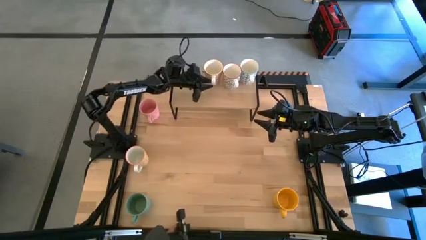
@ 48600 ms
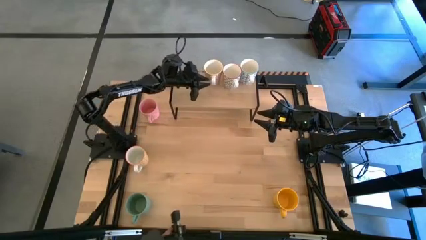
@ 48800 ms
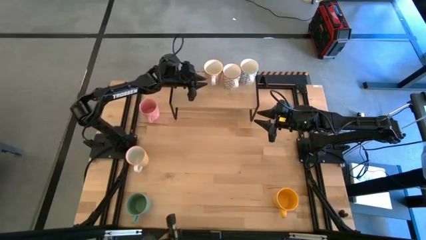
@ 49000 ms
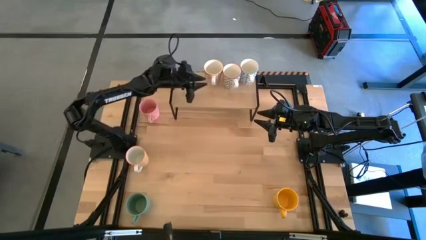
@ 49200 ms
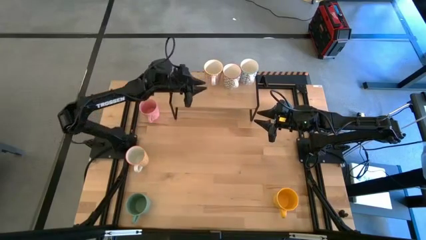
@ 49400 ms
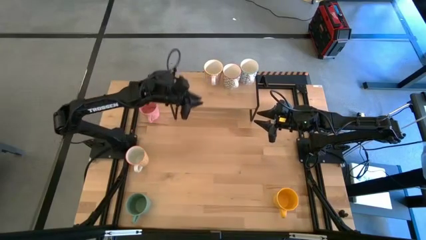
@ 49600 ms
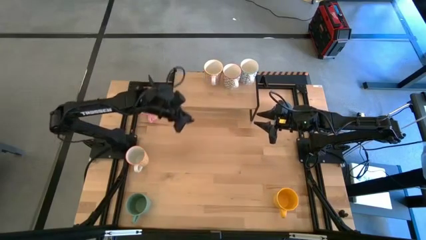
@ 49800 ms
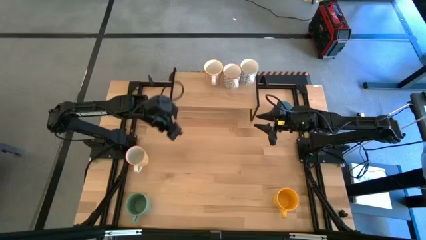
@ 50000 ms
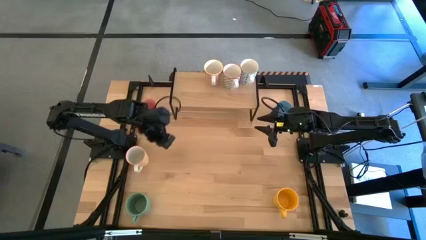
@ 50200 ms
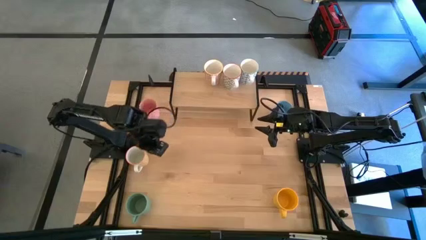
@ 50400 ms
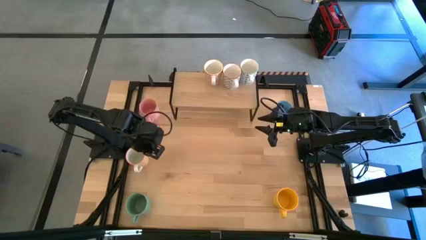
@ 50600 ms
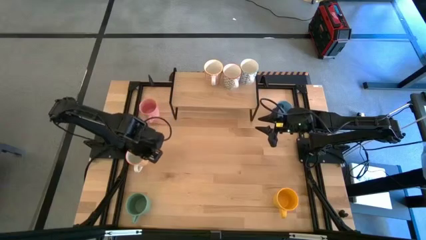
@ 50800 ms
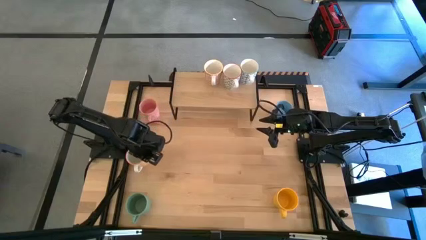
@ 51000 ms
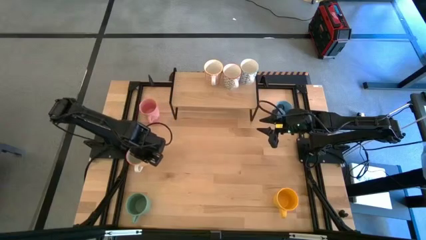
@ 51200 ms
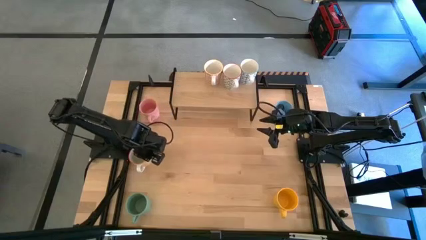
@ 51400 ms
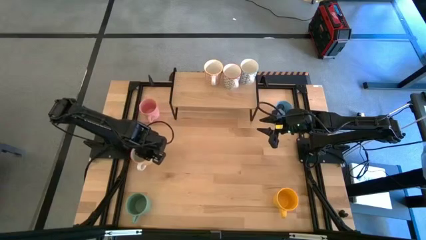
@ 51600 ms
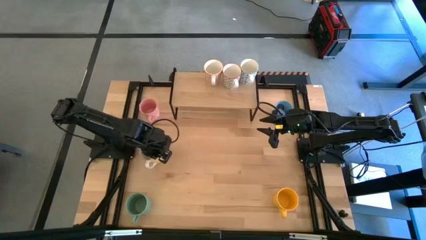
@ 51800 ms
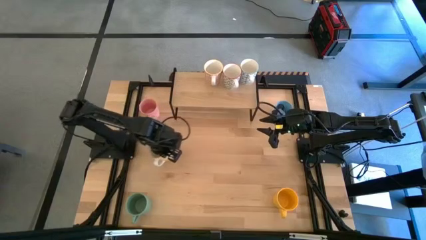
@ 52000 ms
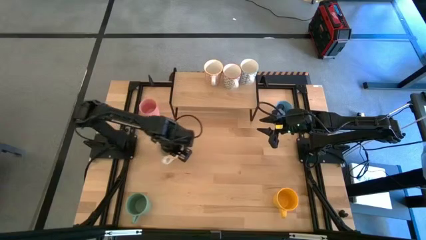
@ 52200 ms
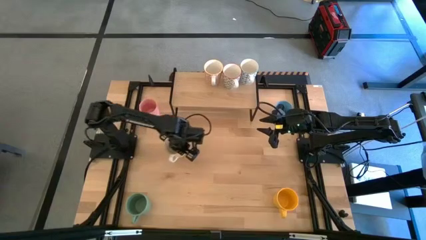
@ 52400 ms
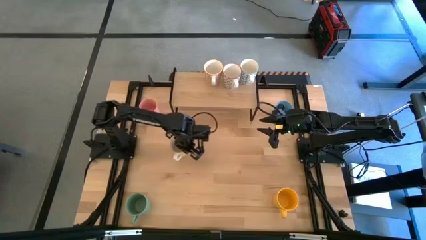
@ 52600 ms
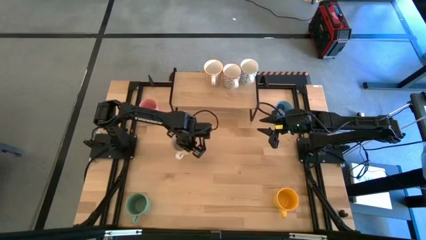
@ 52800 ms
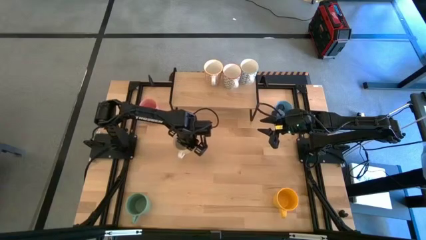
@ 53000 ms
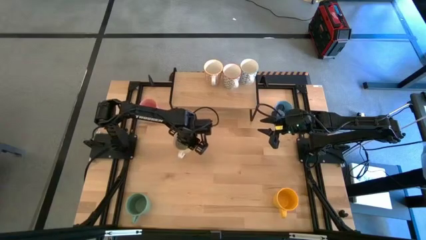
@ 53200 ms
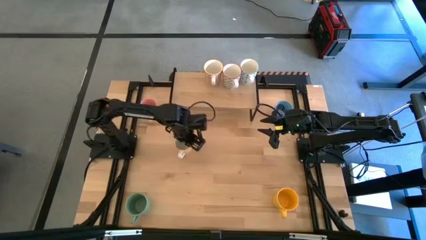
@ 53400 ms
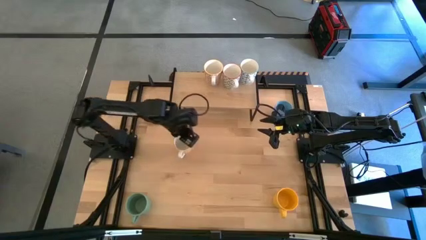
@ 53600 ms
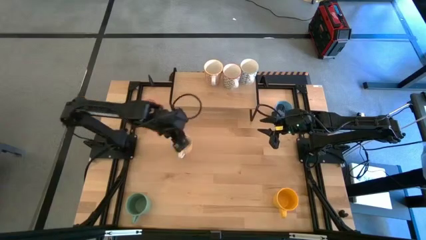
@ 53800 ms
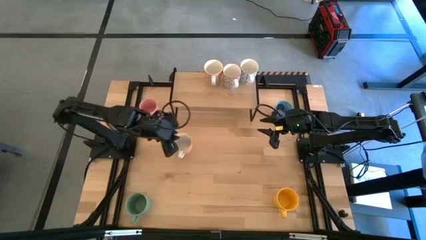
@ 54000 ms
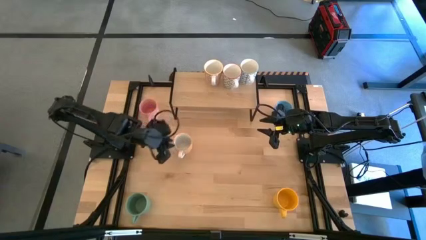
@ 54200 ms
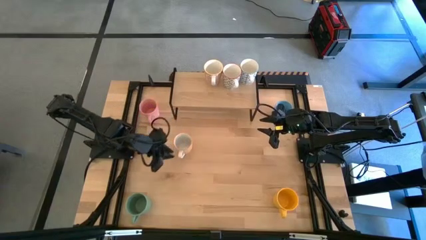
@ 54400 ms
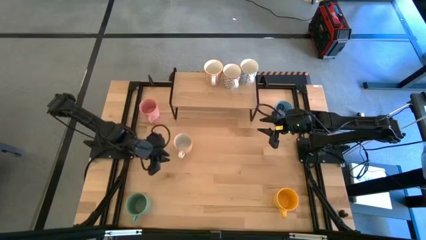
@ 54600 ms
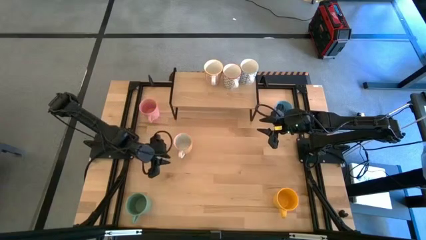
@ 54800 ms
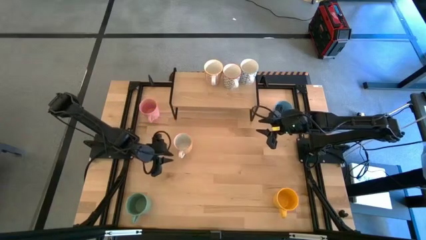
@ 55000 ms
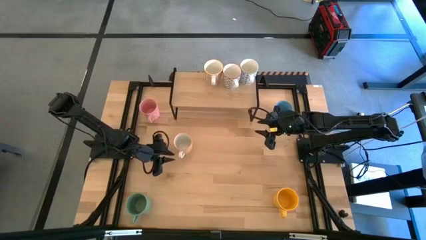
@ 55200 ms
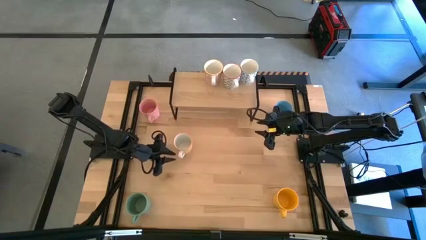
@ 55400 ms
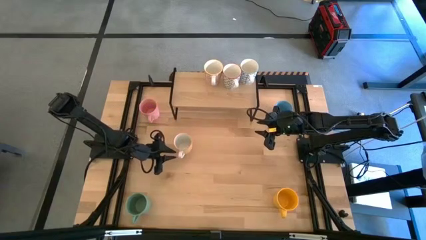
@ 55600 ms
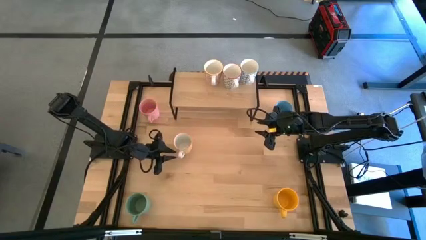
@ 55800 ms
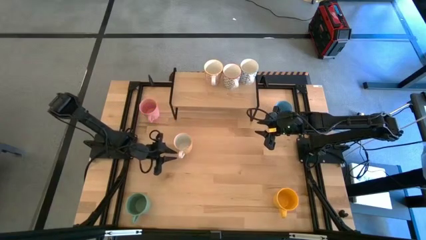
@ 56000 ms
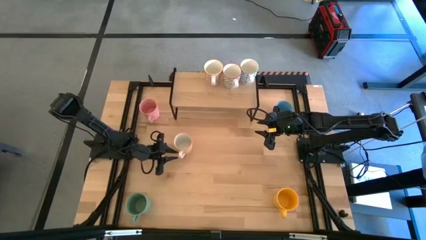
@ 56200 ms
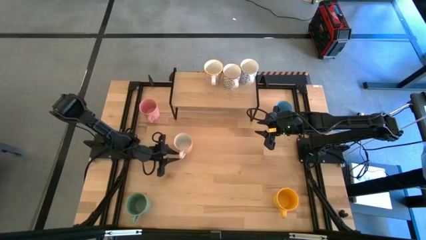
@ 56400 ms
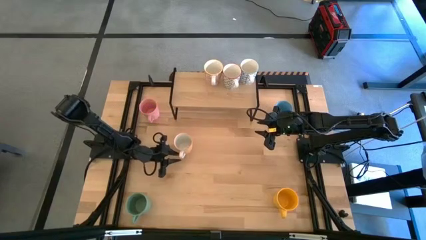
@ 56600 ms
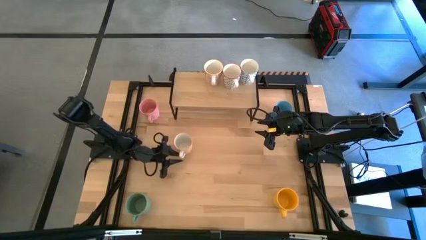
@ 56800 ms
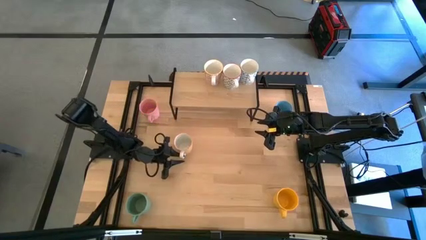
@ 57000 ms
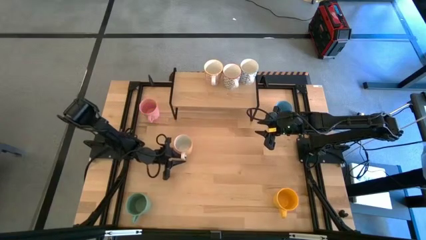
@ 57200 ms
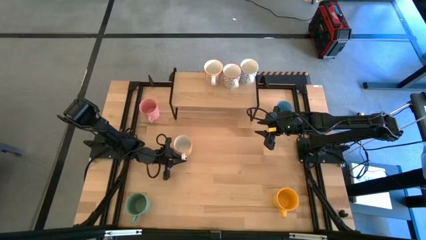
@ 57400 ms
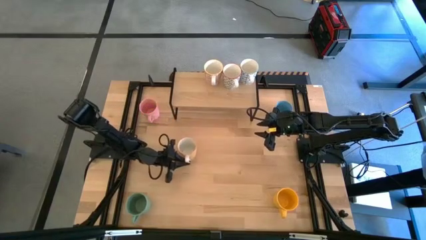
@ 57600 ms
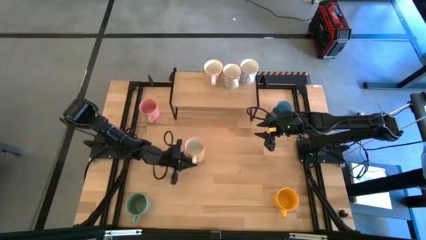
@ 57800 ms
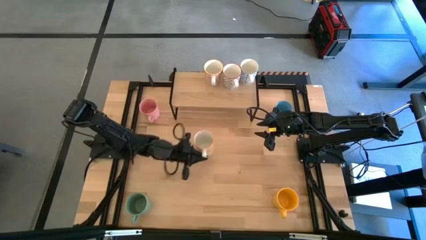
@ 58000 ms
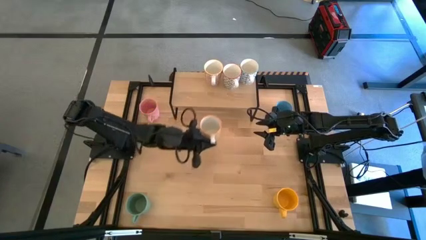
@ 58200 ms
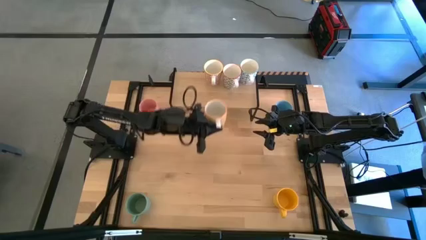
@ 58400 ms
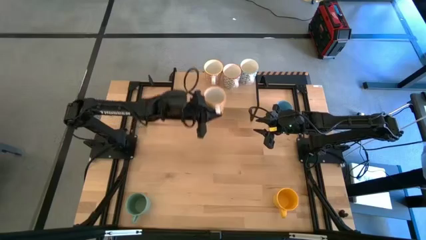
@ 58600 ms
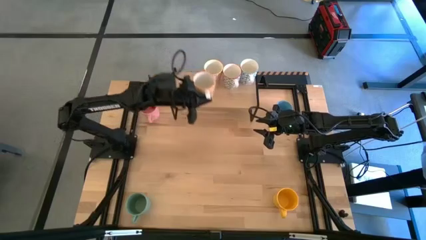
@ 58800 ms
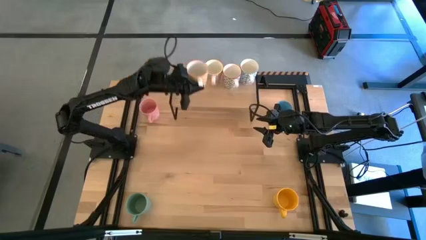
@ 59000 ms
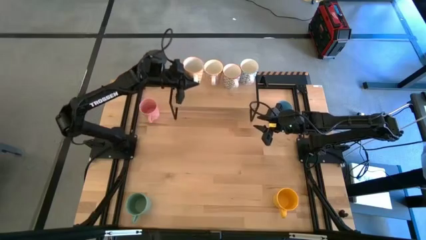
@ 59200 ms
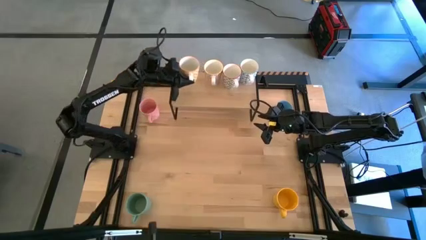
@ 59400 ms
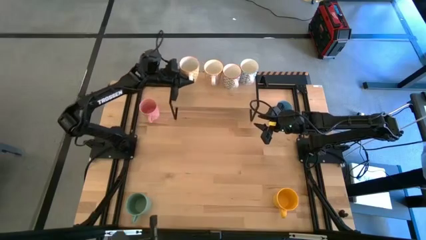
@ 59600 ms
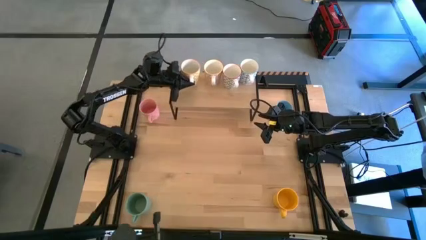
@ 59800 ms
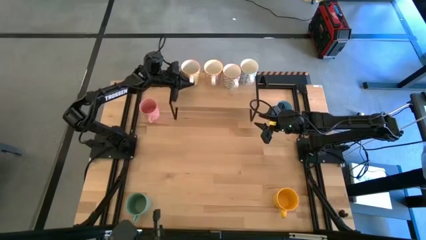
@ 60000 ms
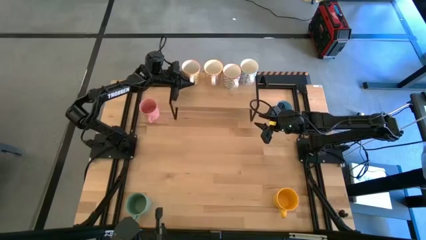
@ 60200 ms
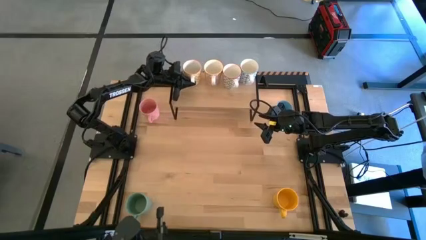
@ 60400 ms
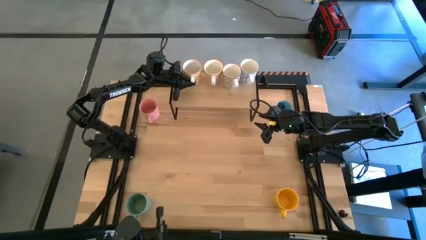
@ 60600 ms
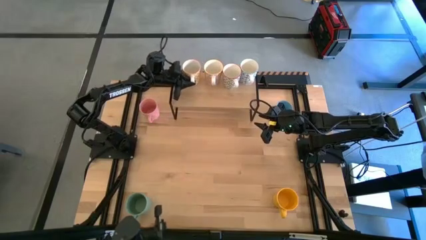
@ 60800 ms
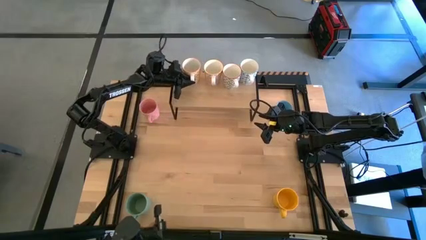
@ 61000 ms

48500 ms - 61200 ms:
Task: Place coffee mugs
Put the yellow patterned mug on the shelf

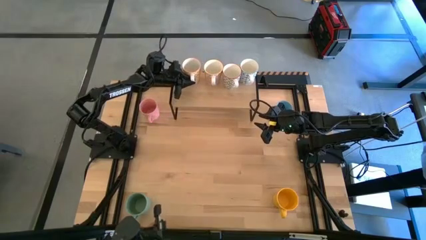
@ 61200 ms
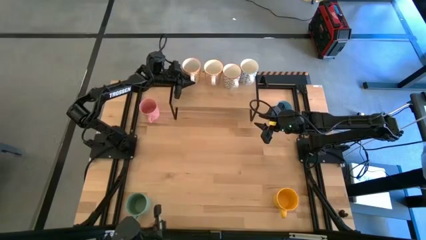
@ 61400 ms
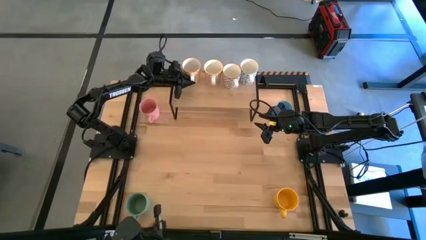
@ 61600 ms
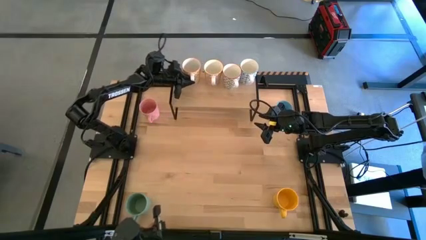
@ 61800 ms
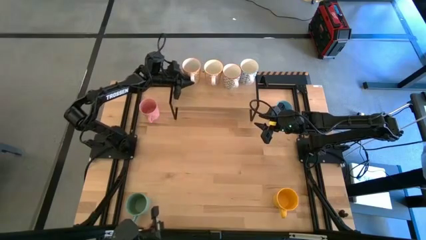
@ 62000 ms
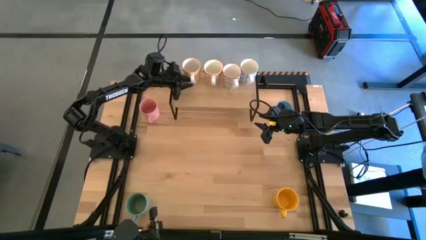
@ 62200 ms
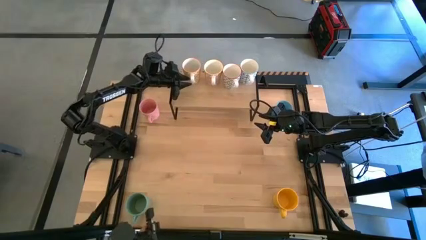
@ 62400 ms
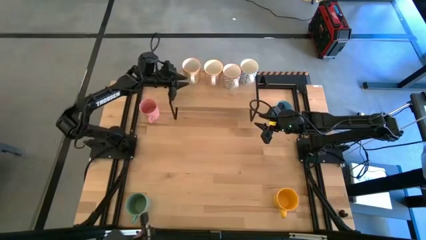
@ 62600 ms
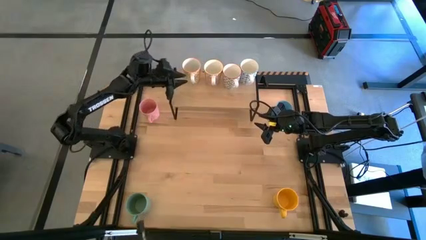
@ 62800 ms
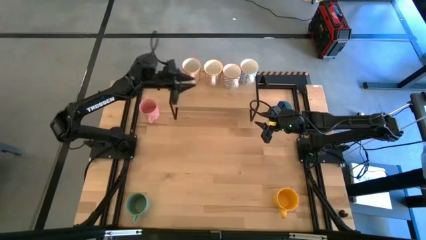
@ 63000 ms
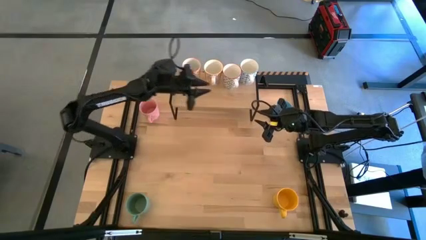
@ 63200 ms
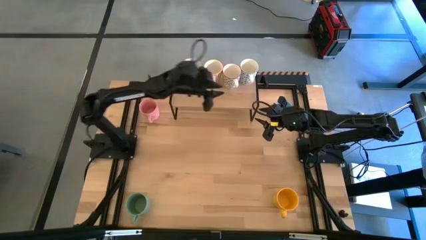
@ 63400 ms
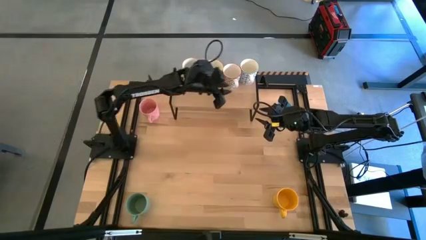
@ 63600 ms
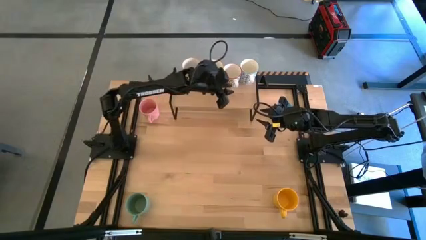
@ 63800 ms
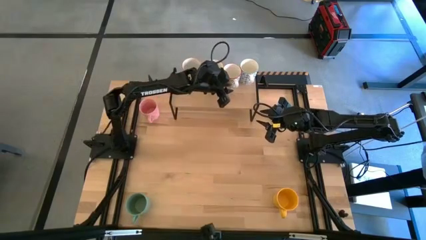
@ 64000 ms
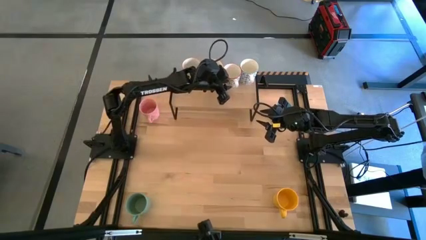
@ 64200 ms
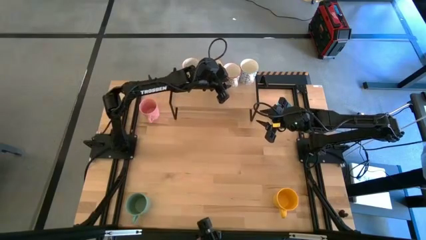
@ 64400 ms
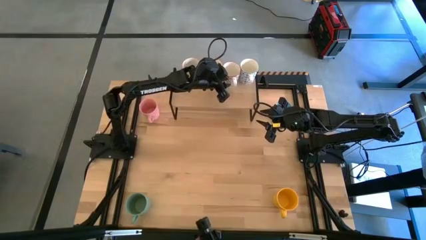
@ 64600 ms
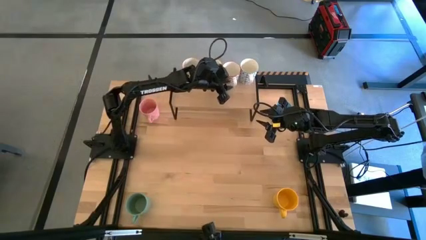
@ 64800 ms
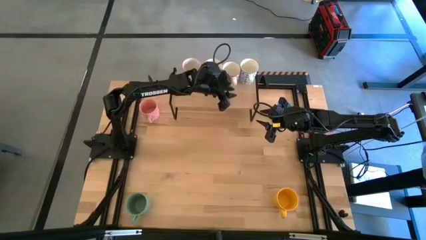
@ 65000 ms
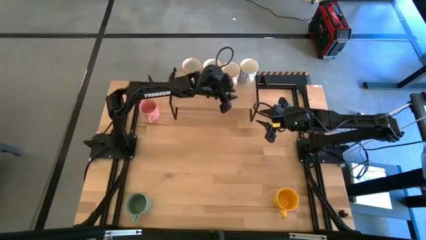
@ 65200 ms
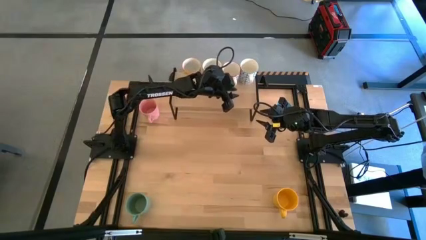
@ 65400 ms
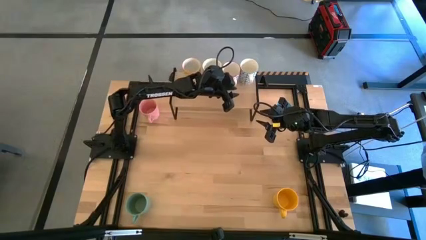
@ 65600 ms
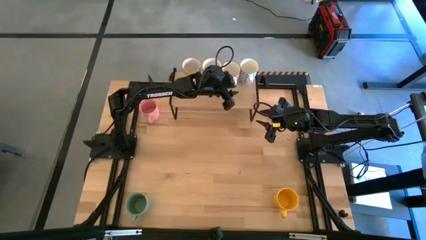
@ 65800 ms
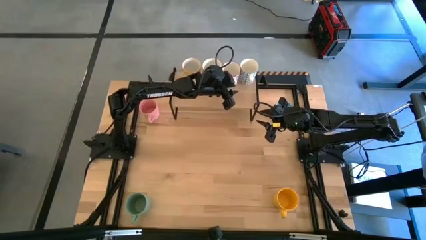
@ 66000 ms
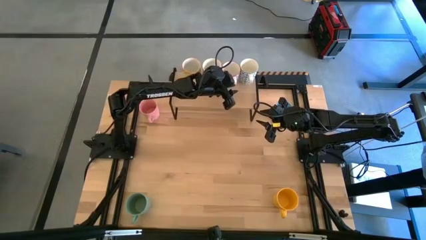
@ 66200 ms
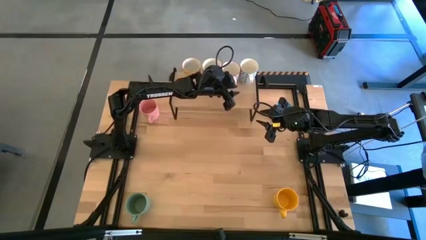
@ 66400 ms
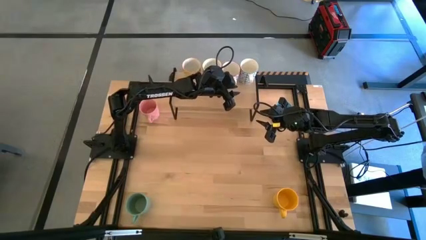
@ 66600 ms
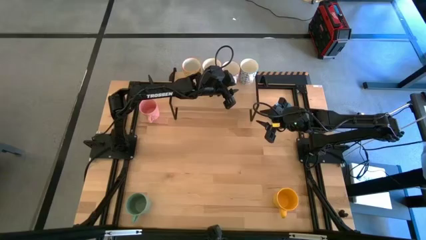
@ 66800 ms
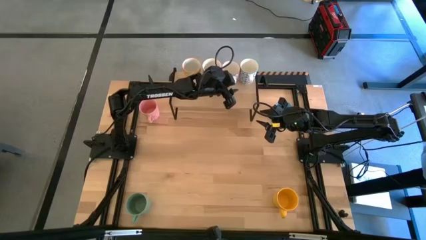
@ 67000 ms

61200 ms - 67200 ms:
Adjust the gray patterned mug on the shelf
